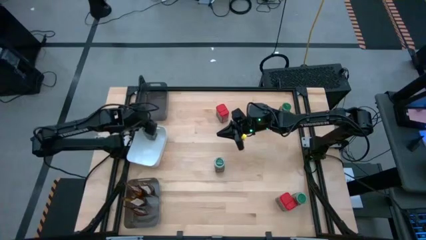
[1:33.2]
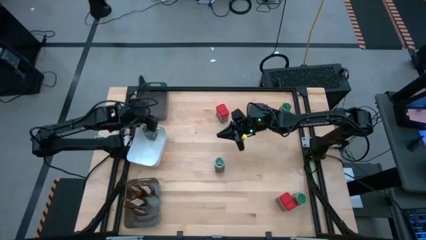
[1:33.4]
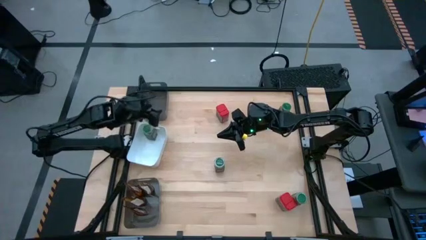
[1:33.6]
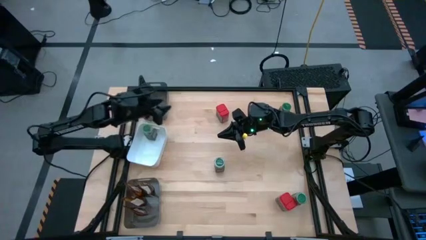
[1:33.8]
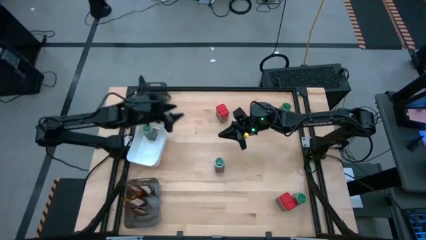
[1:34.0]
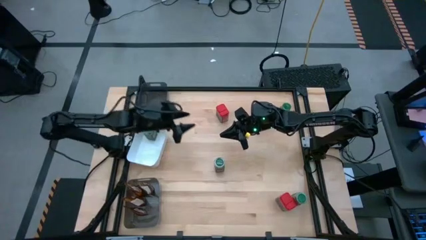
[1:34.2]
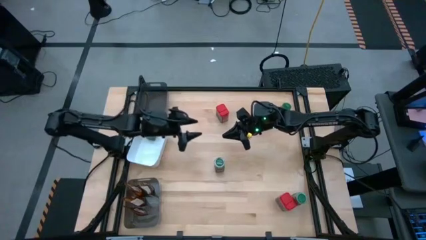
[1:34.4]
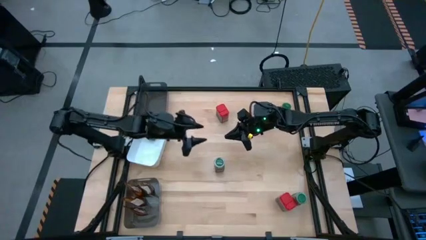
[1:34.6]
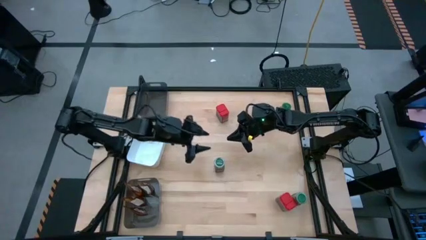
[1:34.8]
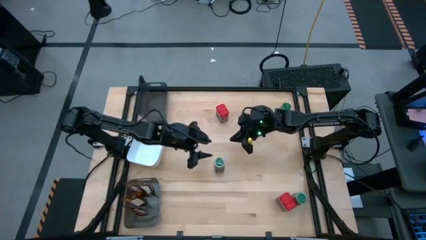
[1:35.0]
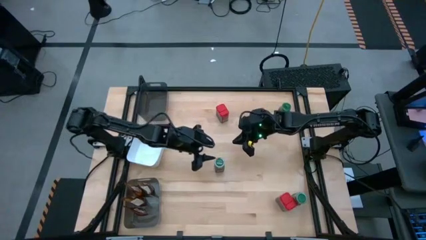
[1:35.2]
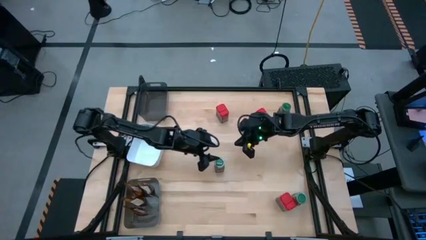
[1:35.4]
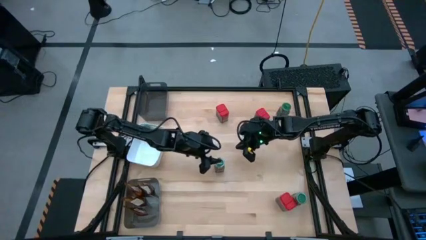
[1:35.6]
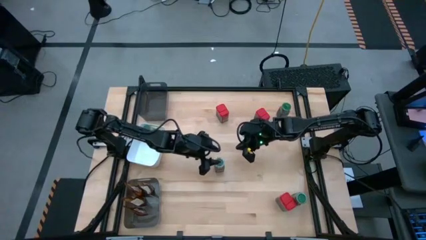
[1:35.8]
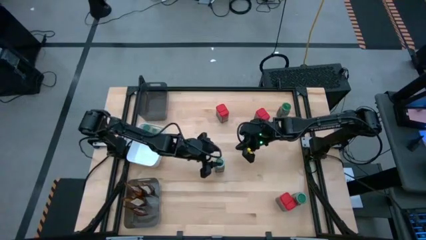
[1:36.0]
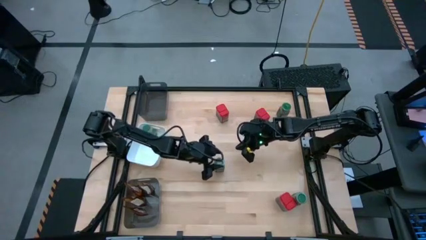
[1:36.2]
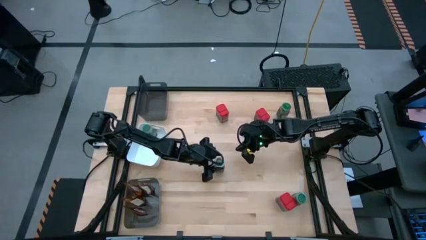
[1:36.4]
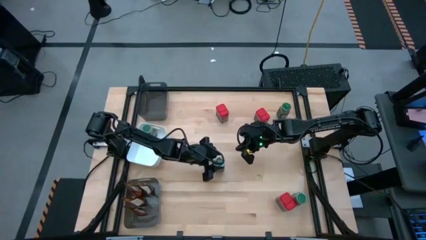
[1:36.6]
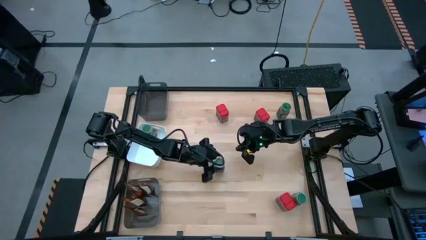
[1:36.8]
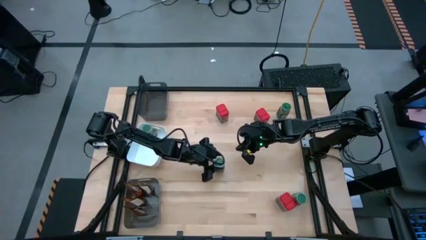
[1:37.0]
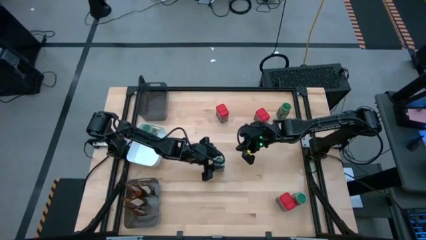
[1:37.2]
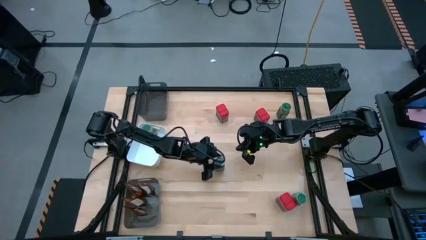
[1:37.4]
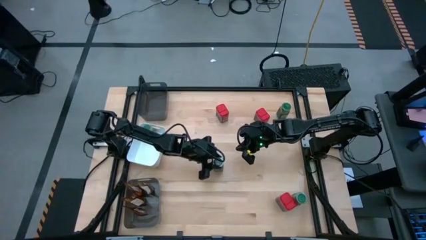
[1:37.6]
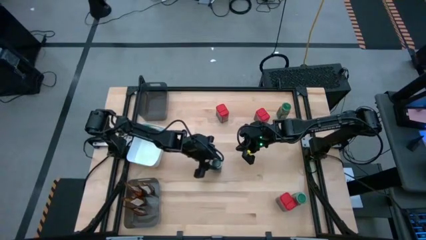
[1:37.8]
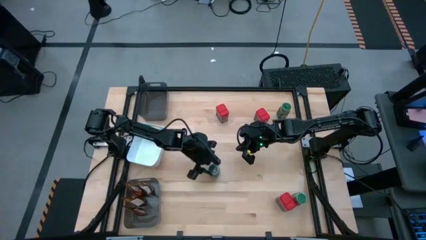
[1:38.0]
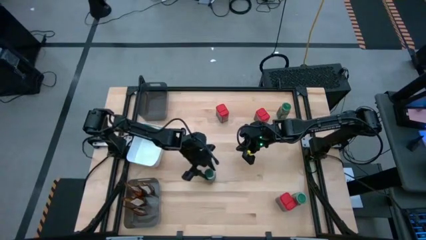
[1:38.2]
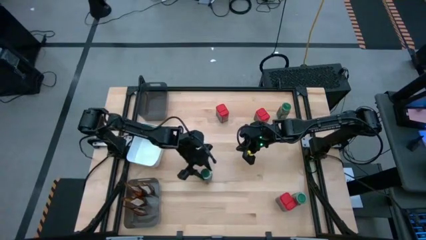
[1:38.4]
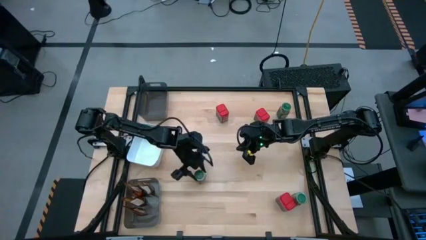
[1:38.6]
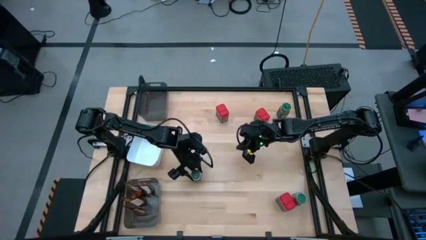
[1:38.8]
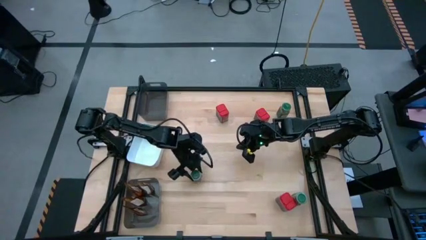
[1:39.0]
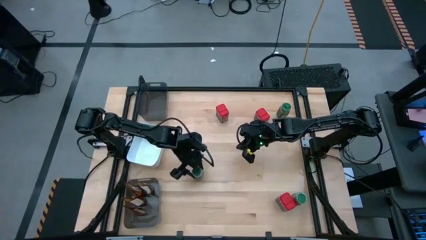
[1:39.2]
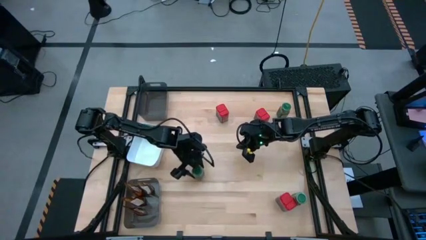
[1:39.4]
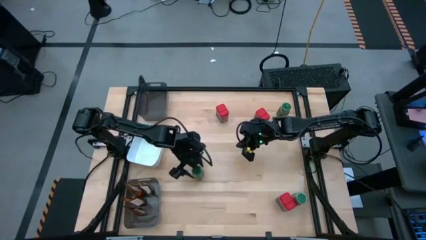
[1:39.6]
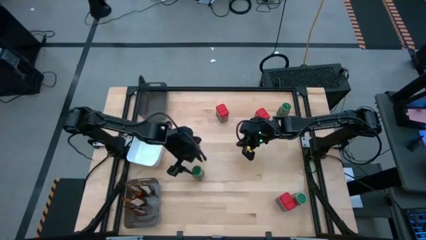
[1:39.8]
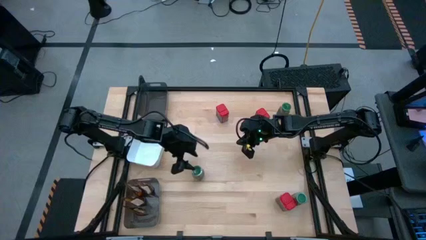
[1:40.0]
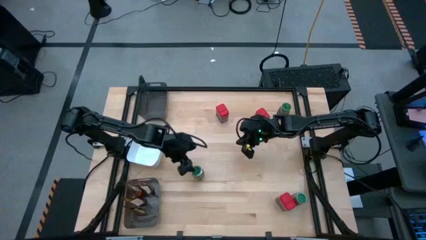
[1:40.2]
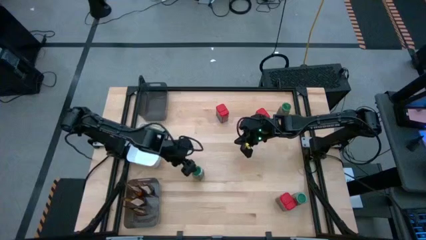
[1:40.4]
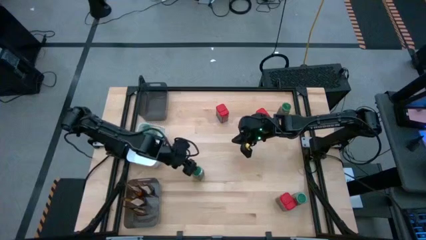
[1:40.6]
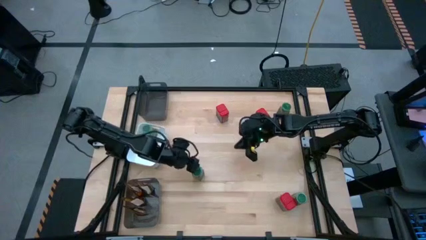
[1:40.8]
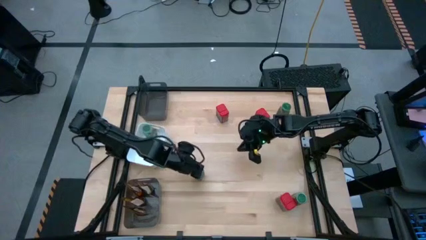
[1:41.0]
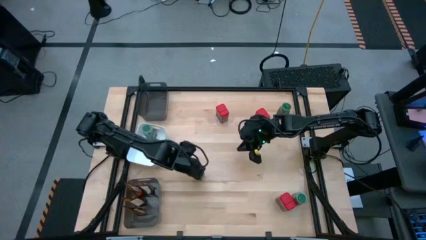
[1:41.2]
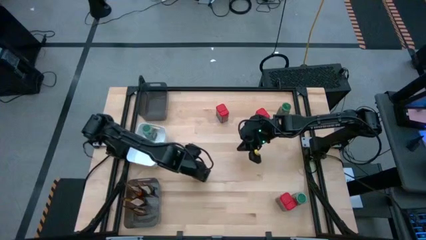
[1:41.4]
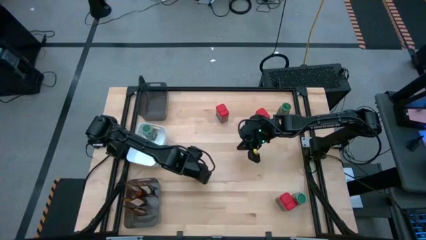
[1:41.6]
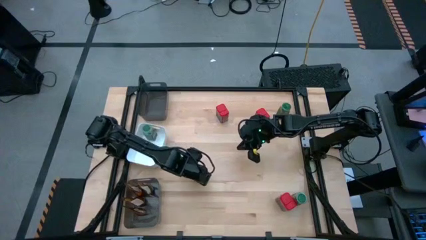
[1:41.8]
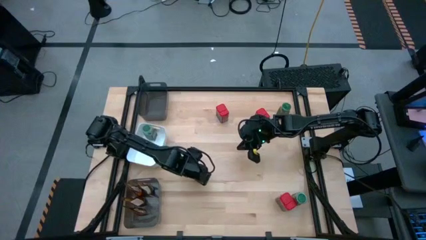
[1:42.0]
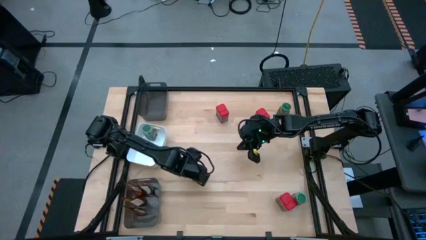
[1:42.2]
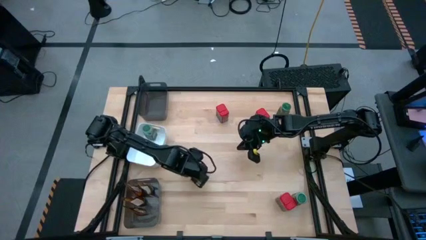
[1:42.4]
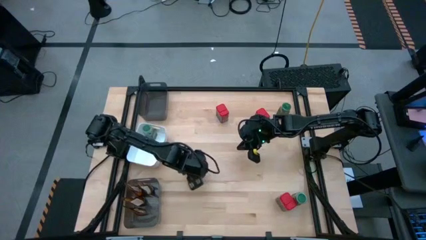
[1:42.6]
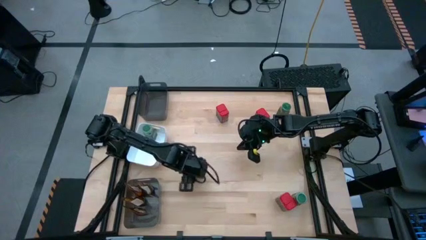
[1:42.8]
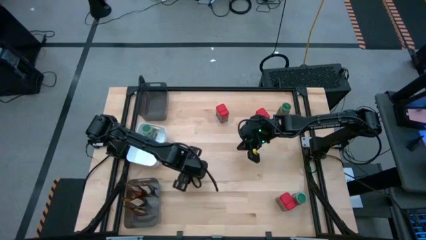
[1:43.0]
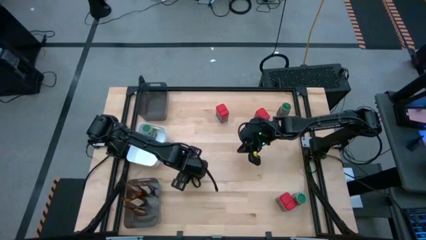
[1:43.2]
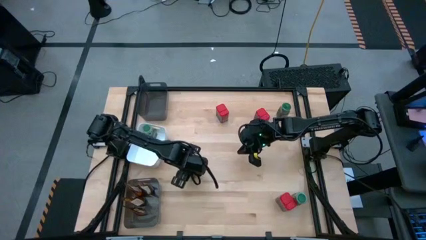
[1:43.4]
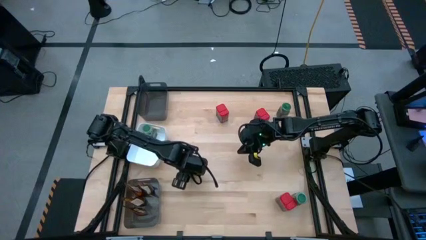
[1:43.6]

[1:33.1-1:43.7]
Task: Sort spices by type
Put the green seasoning bottle into the white bin

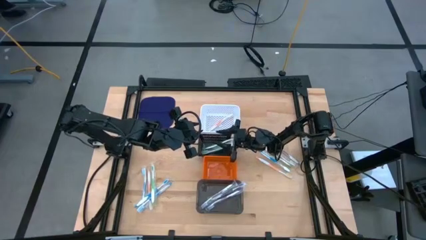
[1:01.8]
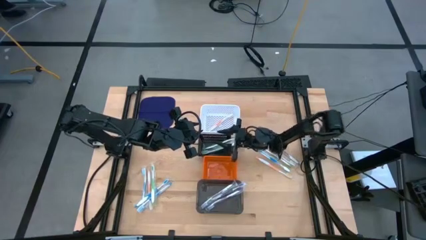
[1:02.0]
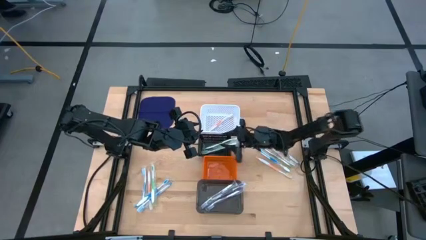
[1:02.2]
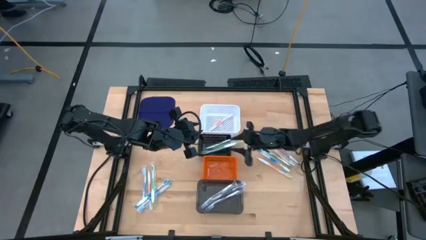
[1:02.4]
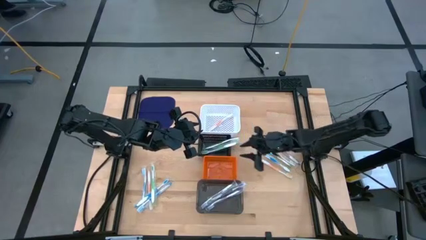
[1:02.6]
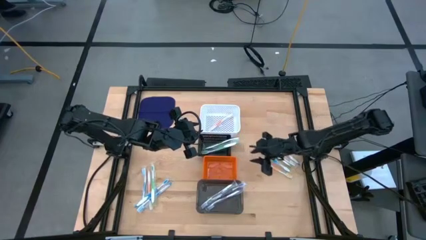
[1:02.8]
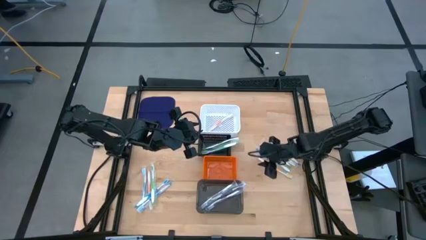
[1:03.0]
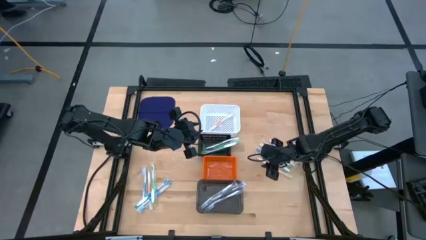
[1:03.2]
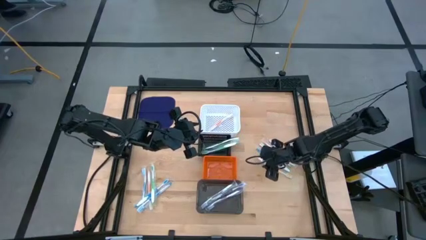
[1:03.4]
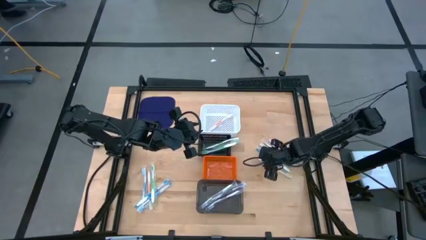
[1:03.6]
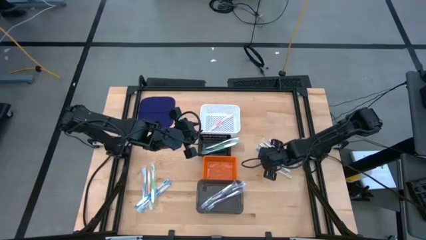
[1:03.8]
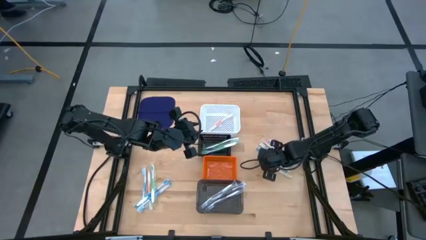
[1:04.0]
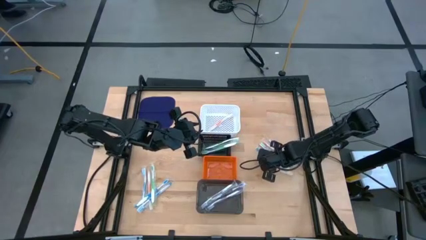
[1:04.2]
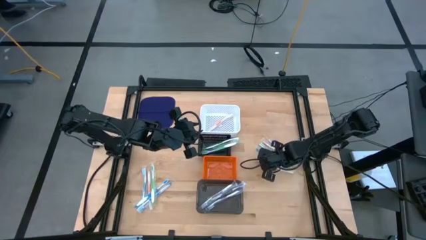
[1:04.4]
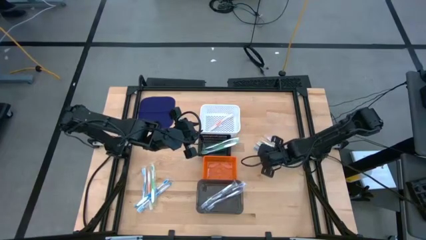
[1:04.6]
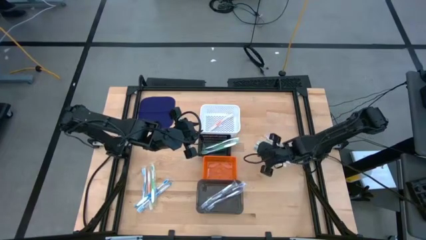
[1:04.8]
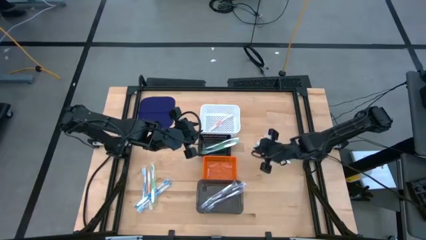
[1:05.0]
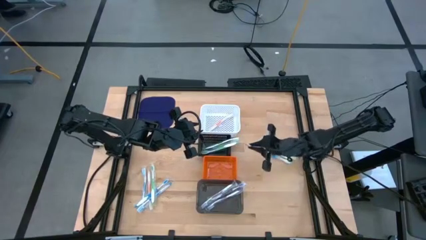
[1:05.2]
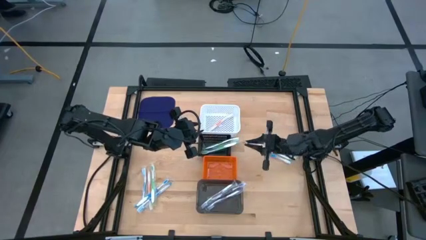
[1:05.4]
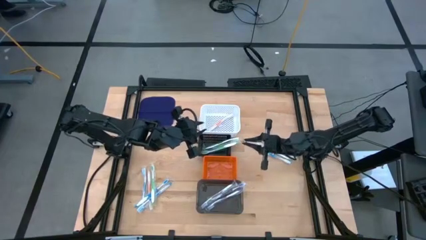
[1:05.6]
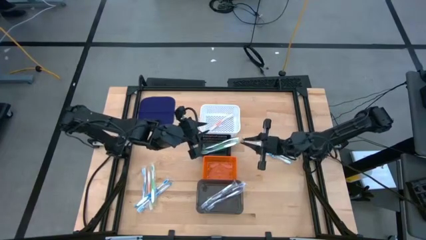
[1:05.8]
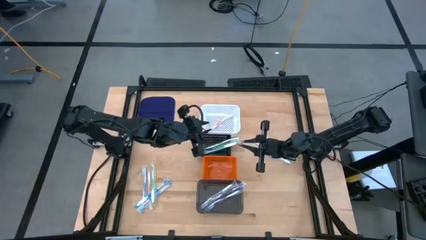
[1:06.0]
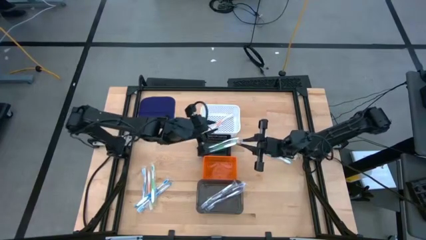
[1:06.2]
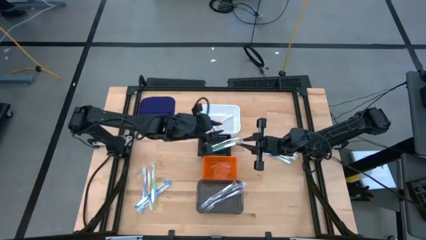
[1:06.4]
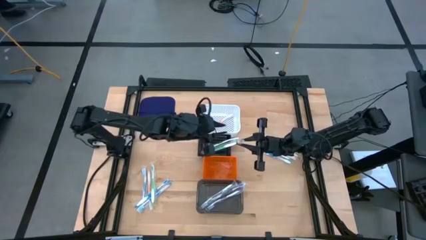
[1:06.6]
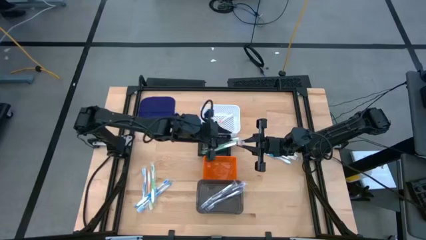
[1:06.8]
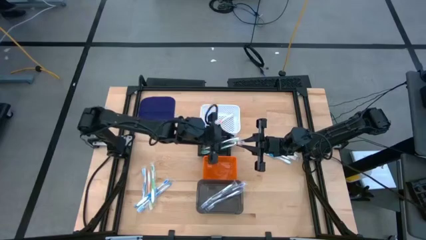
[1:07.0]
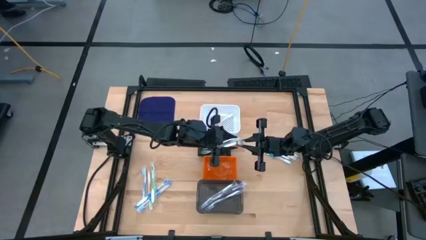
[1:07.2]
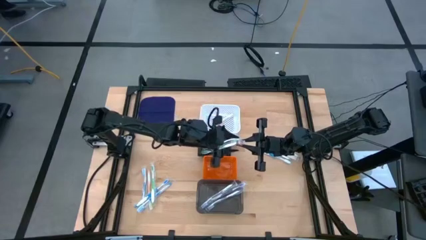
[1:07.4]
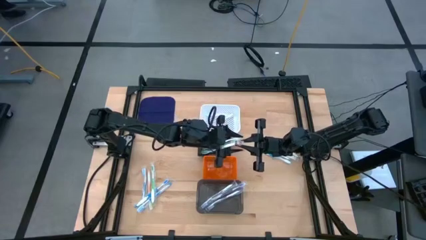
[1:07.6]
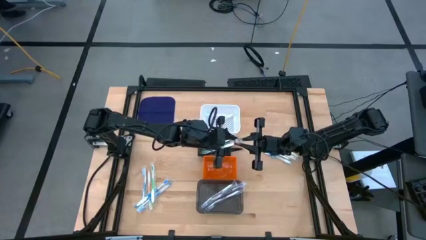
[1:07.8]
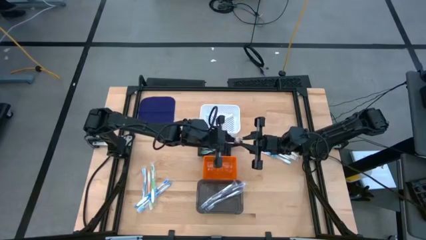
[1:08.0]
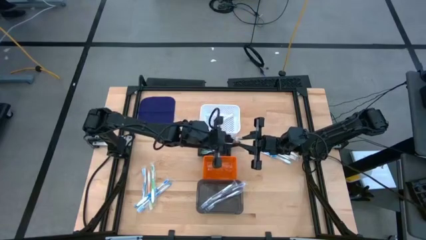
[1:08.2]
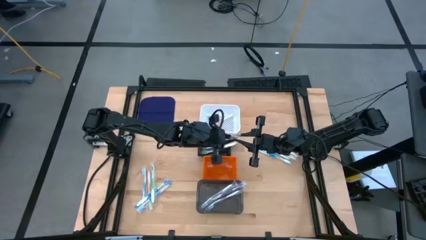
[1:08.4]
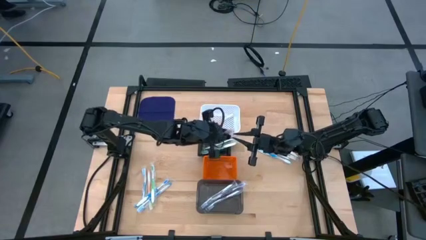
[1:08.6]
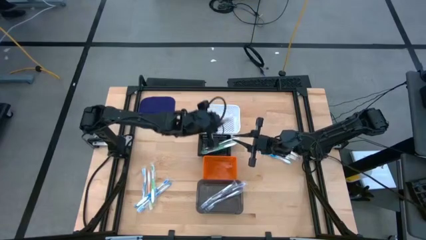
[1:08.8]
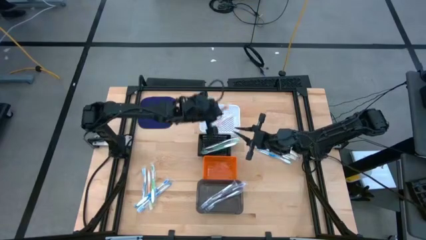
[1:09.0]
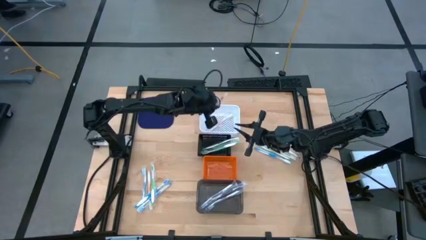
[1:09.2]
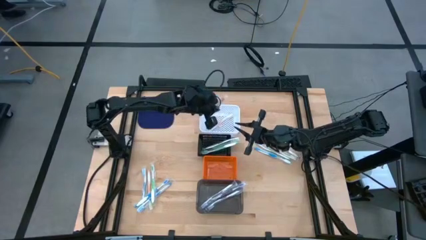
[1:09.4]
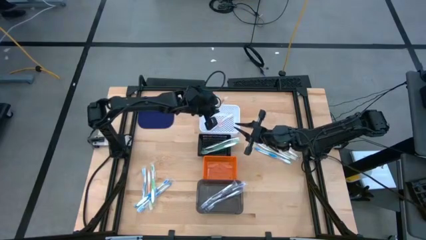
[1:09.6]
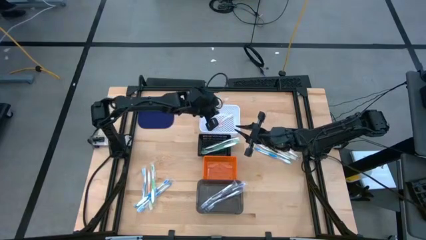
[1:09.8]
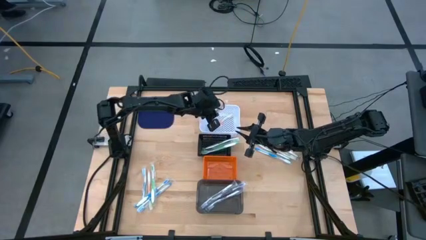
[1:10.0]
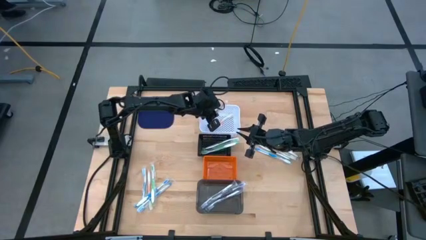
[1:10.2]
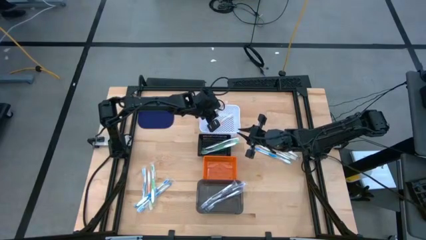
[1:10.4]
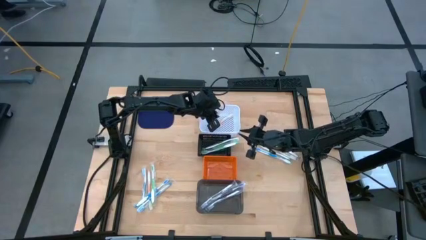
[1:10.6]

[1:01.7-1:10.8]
Task: Pick & Place Toothbrushes
Put the orange toothbrush into the white basket
